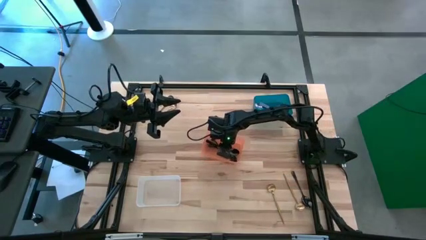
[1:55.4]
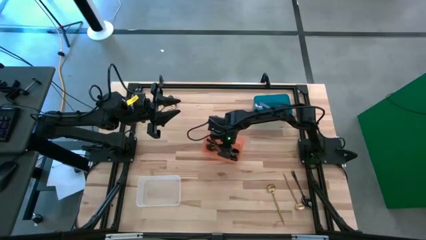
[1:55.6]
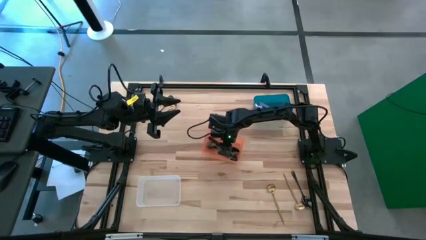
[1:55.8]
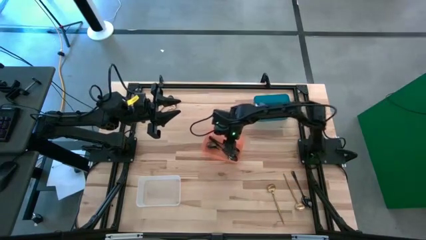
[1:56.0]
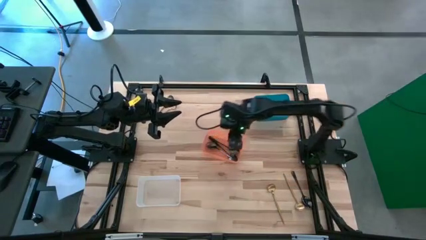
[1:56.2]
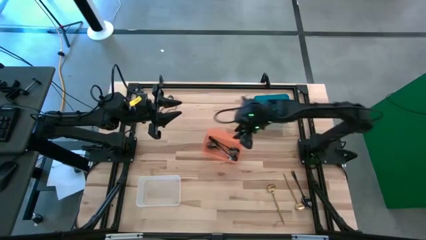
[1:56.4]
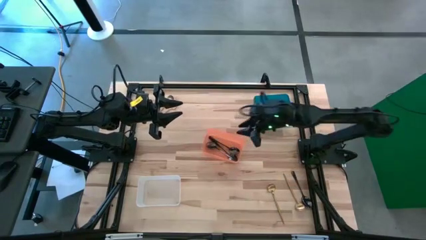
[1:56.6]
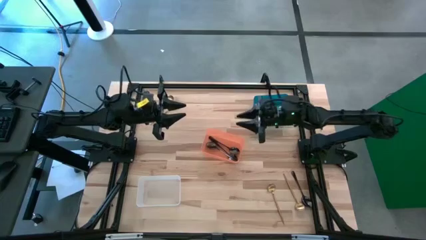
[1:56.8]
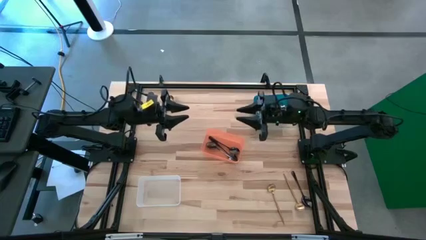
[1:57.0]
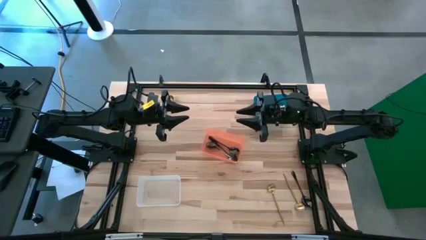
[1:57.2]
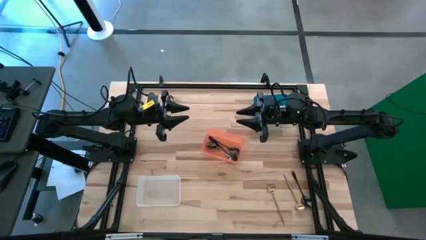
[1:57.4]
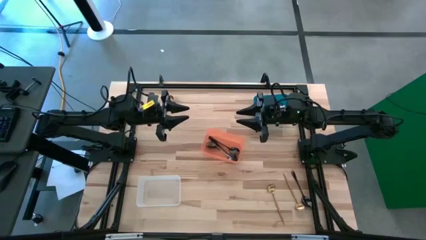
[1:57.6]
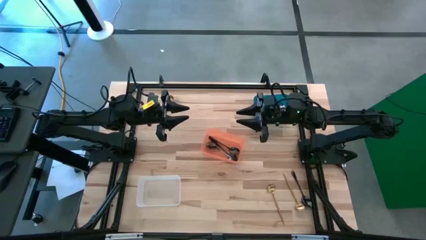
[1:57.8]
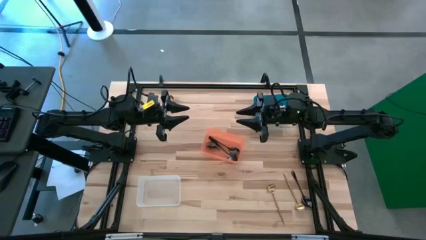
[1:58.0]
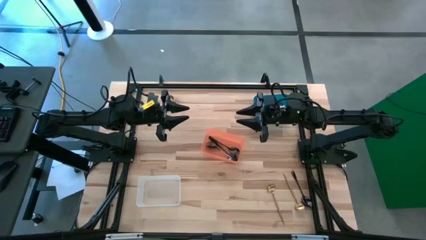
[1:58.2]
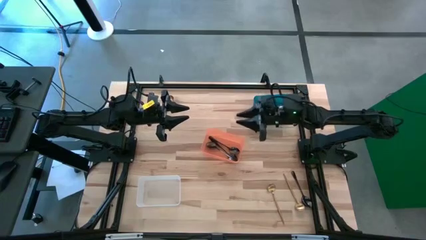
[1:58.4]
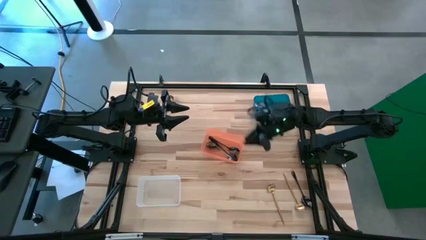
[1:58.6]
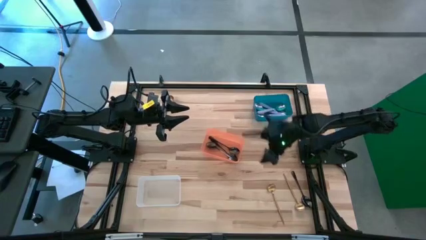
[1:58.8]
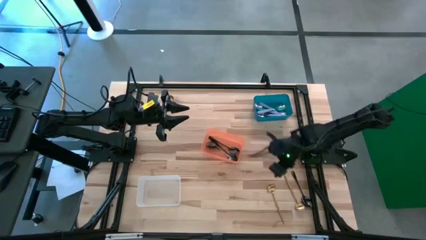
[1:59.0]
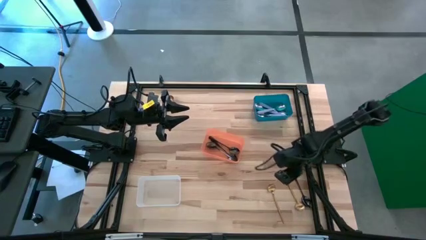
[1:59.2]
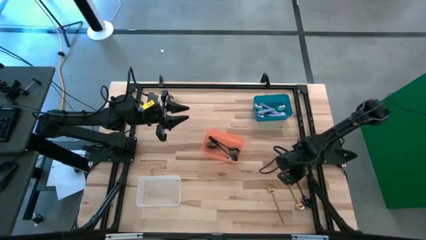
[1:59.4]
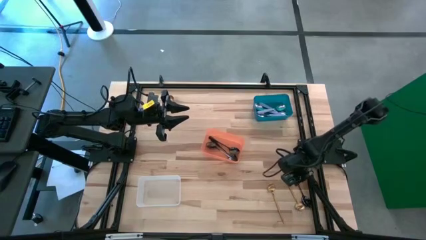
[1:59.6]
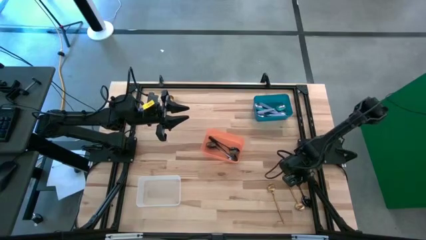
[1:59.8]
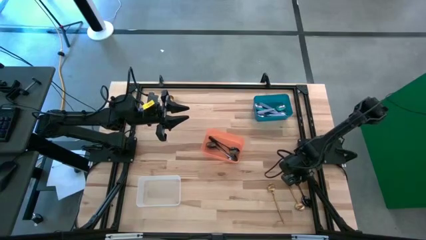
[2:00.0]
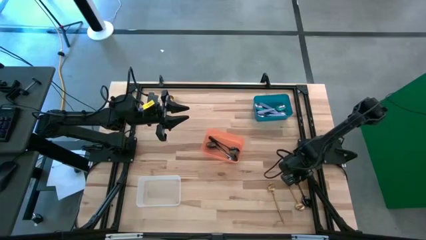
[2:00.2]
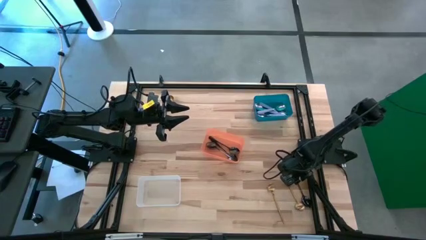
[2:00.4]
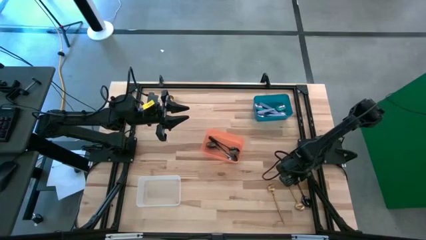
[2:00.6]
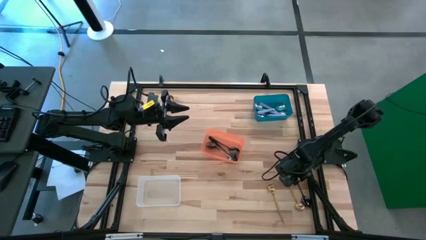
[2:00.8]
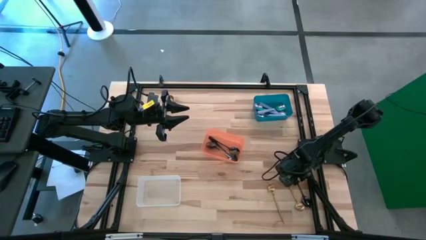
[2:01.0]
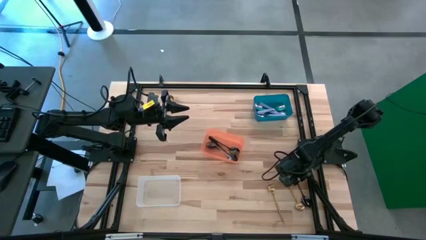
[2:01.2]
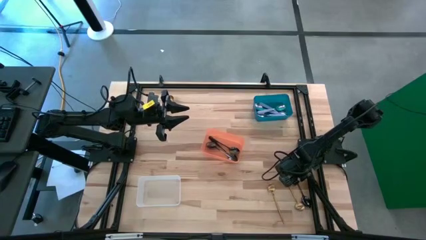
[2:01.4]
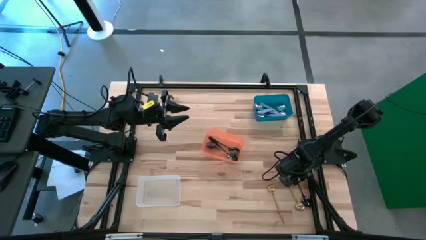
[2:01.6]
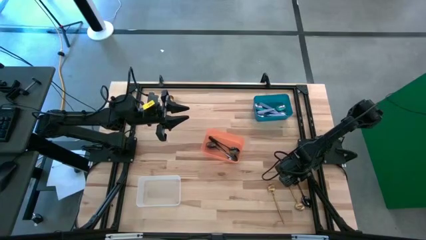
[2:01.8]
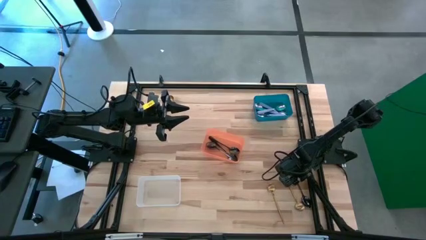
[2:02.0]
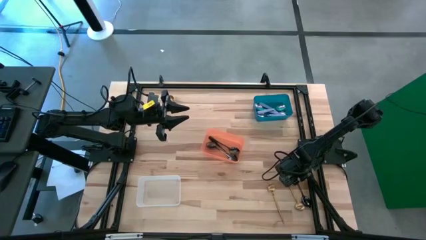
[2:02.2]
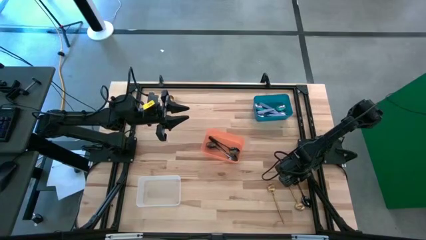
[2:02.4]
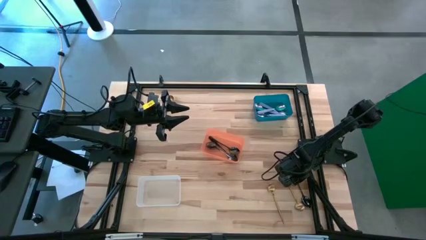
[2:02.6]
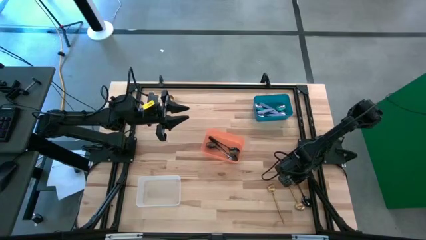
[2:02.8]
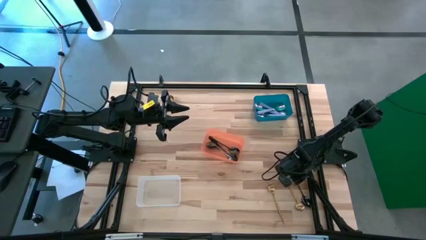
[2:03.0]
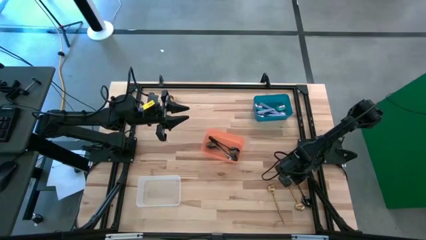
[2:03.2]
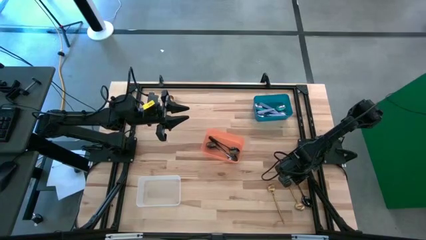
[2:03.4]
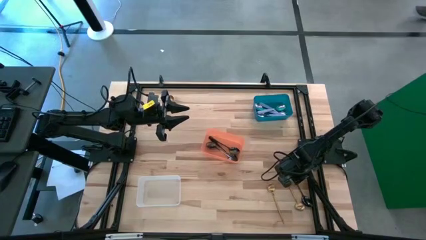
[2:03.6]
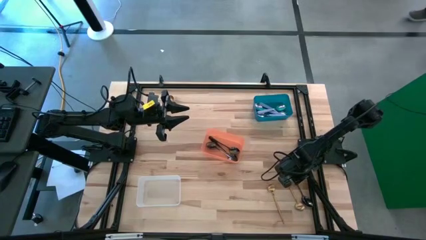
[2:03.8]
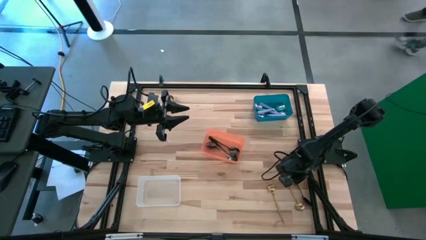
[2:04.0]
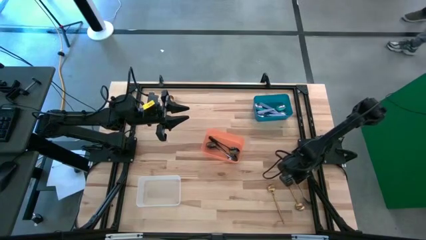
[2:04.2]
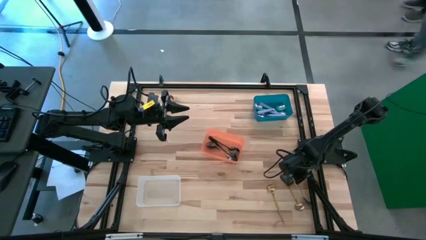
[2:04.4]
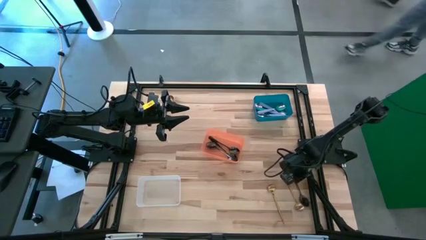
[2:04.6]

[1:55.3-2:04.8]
Task: Sort silverware by color (type)
Put the black spoon into the orange bin

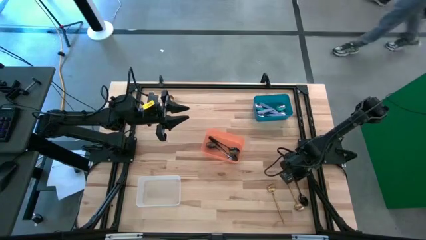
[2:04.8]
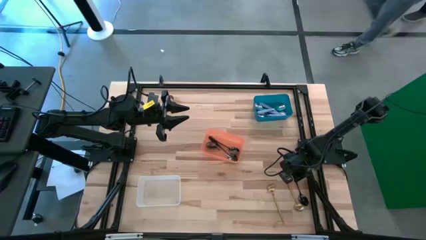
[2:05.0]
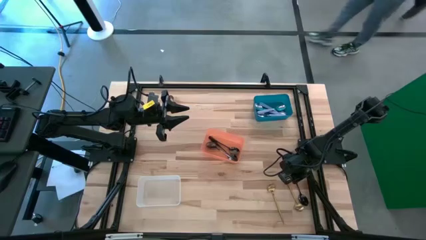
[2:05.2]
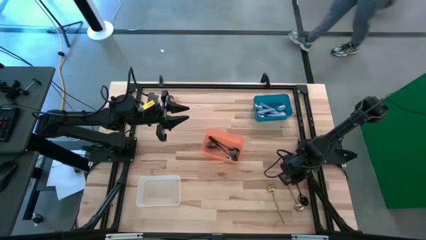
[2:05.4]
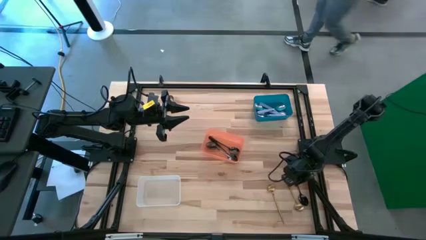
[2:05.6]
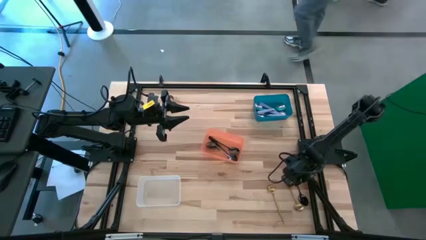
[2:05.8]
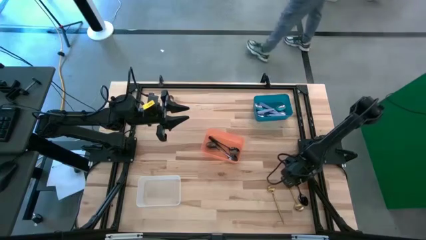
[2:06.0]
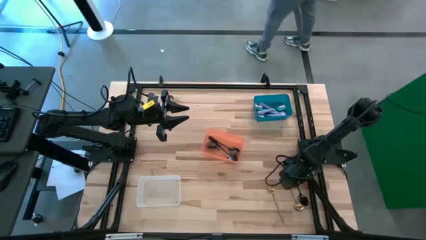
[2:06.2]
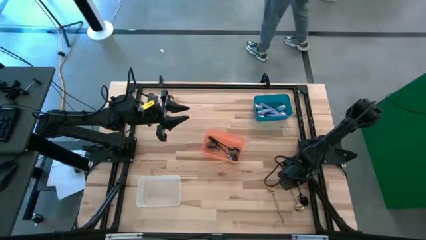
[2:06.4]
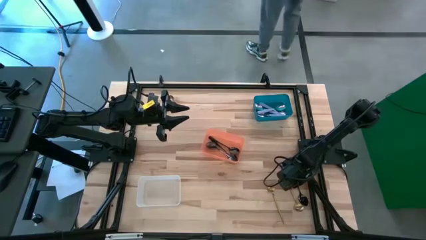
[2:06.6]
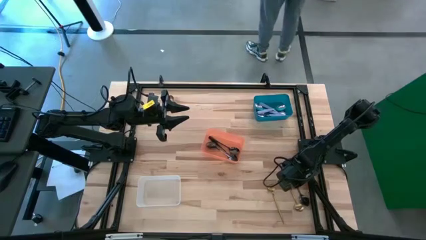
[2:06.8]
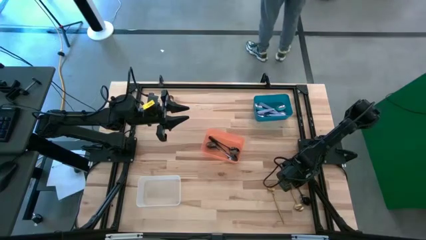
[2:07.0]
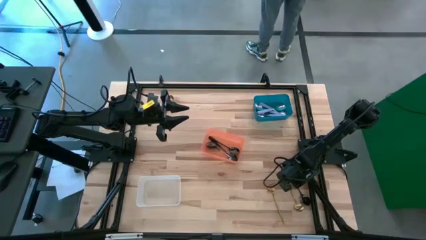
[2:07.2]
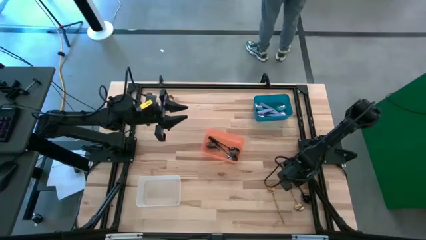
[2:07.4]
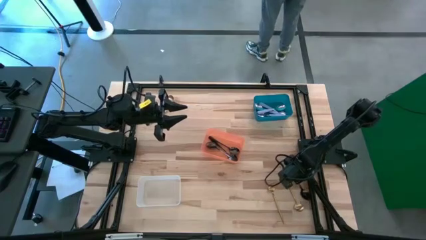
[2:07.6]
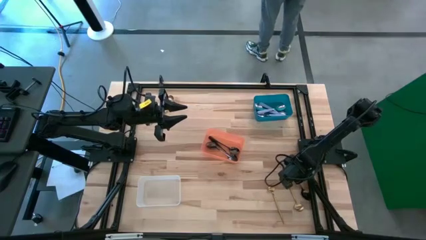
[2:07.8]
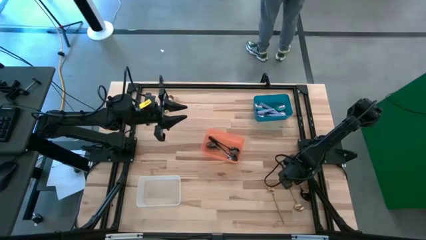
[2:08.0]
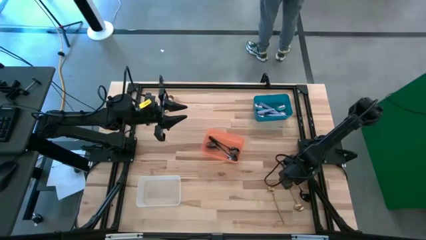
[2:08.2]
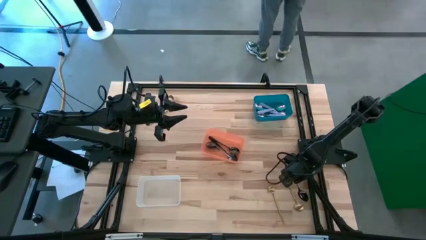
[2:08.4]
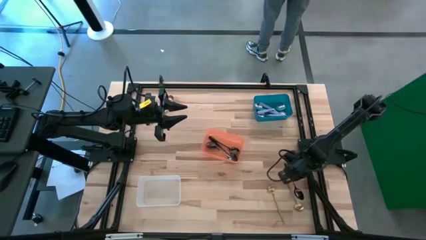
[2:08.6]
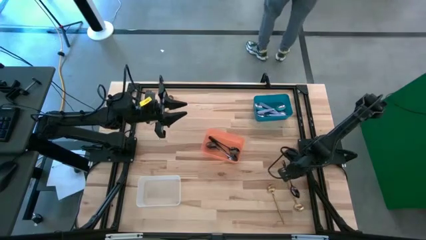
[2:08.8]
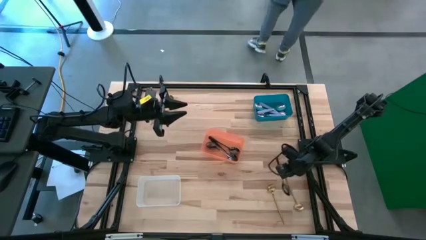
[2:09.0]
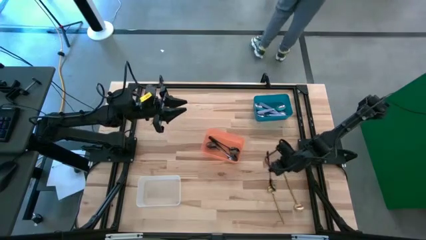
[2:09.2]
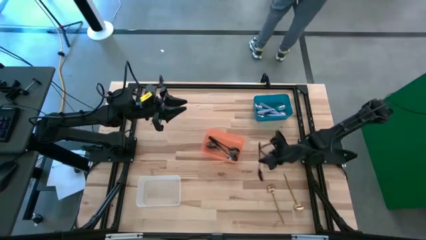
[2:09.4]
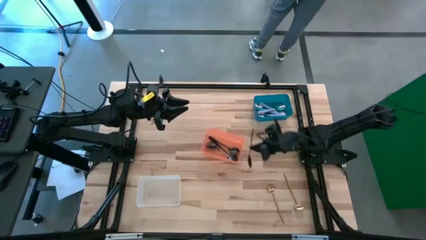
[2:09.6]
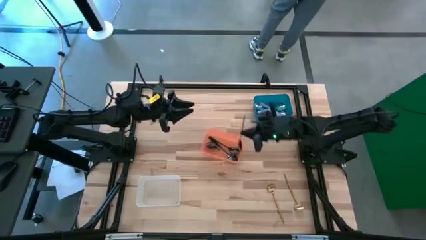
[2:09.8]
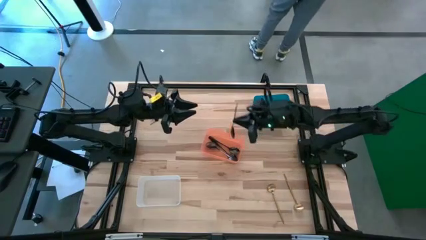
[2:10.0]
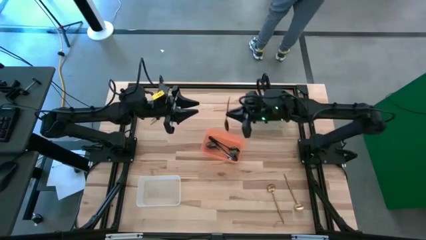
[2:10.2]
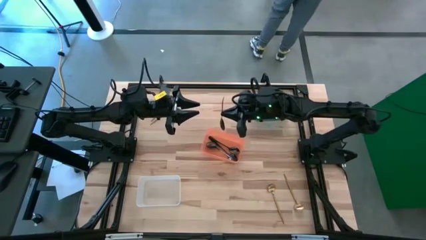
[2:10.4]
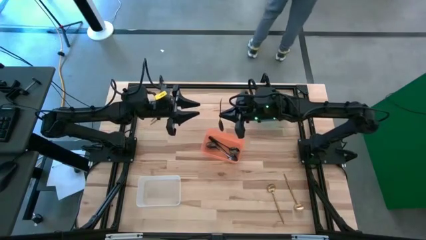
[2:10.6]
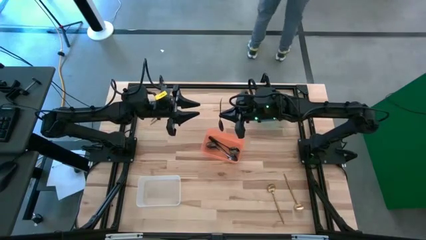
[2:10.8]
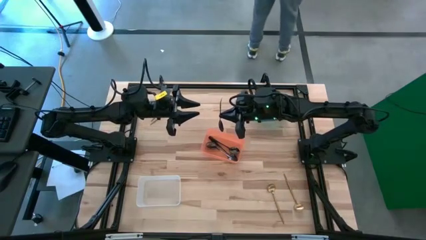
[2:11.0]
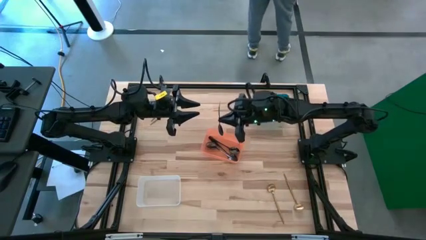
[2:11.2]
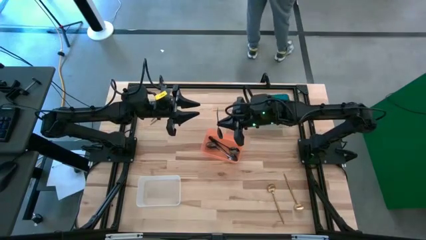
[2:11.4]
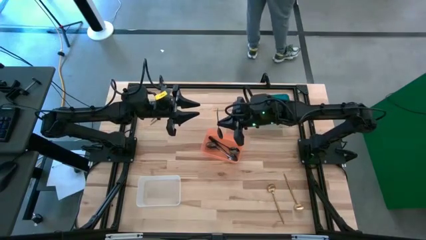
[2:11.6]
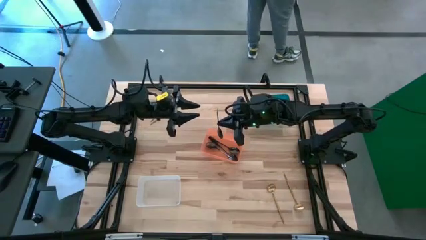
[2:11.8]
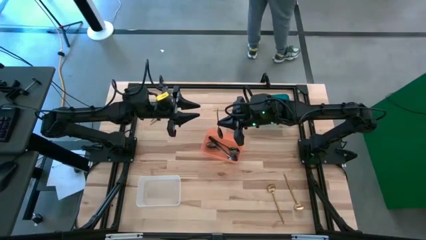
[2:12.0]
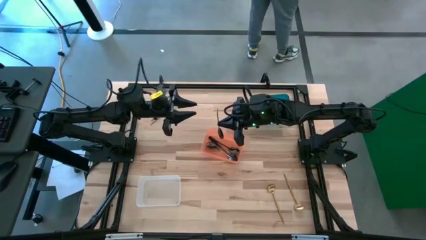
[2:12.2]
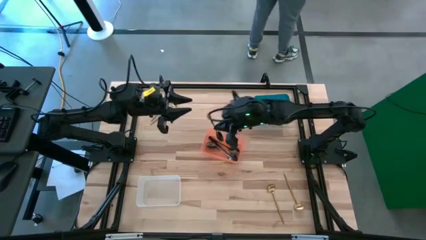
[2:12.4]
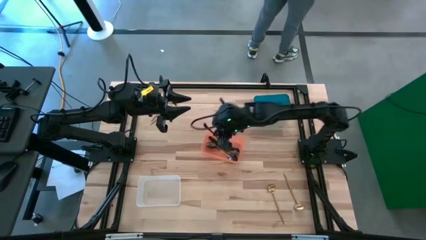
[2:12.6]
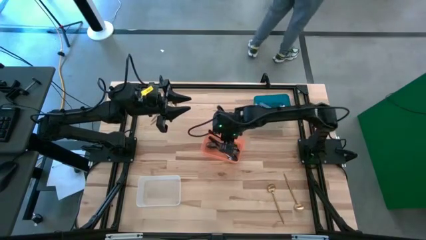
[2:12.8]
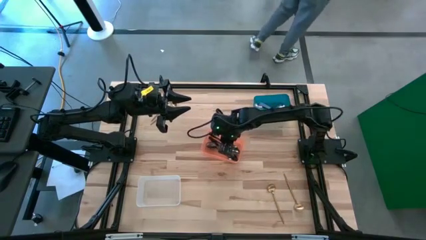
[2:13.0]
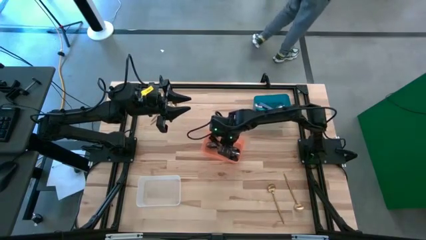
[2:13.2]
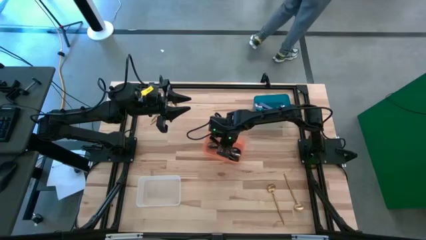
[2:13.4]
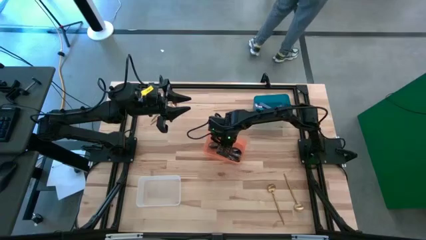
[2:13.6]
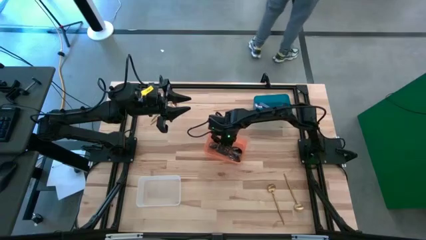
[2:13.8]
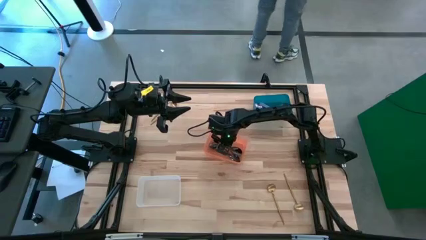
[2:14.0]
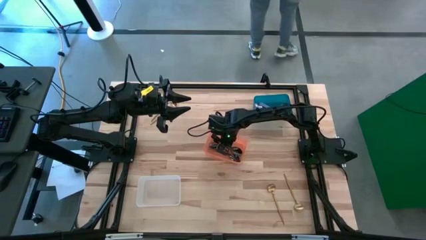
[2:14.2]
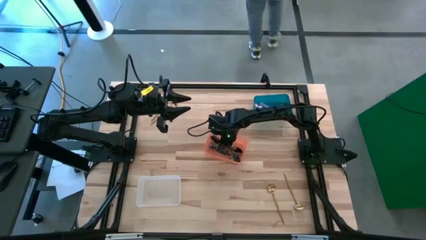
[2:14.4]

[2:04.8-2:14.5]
Put the black spoon into the orange bin
